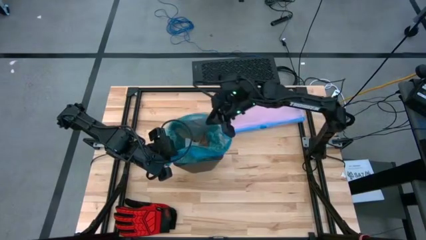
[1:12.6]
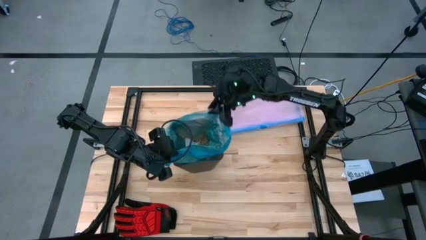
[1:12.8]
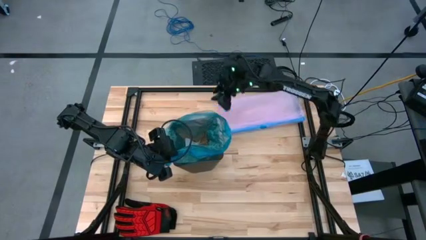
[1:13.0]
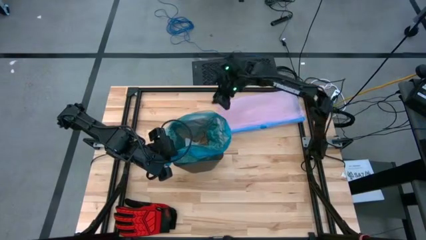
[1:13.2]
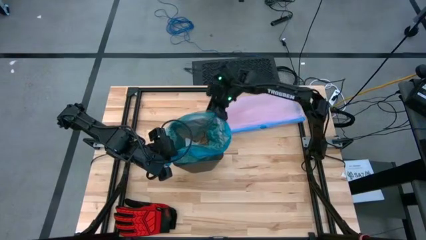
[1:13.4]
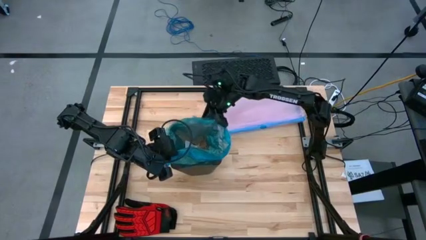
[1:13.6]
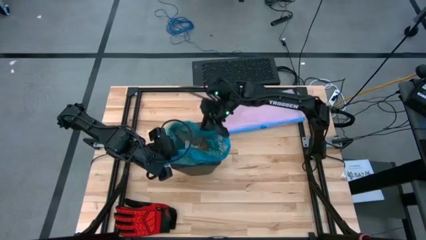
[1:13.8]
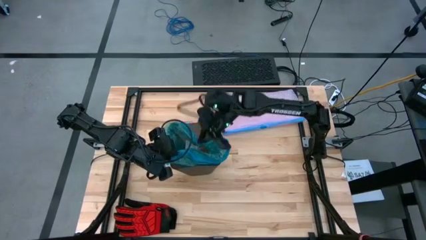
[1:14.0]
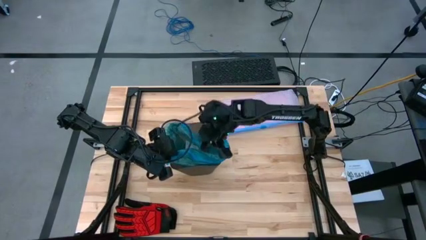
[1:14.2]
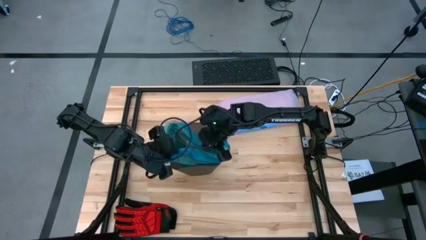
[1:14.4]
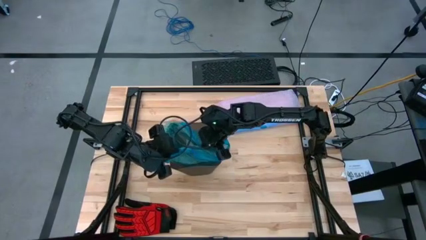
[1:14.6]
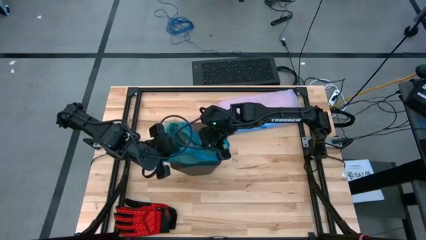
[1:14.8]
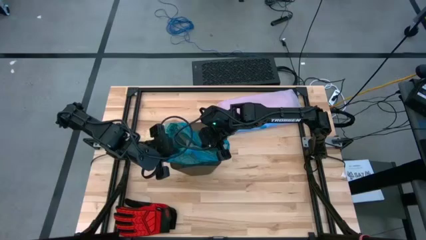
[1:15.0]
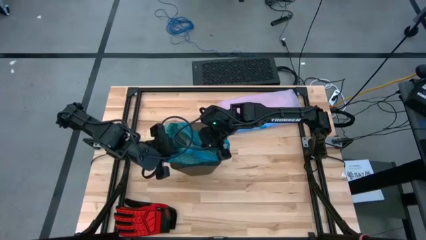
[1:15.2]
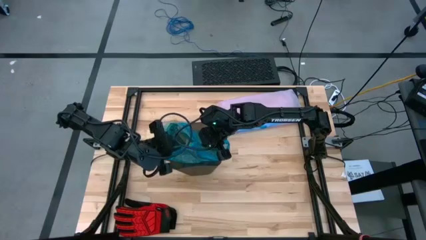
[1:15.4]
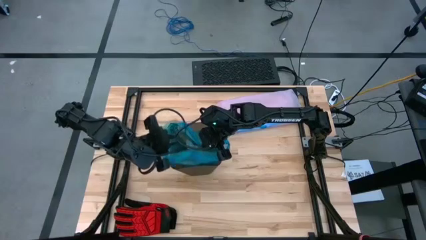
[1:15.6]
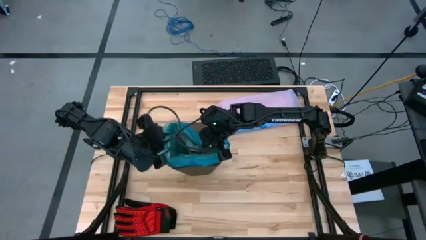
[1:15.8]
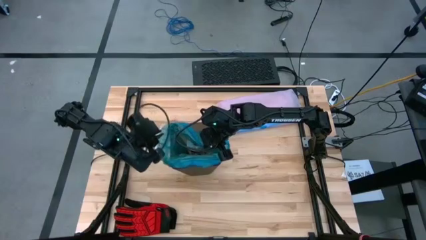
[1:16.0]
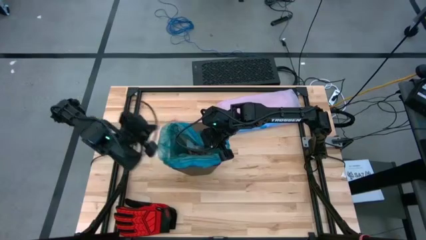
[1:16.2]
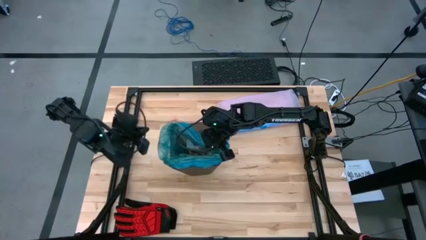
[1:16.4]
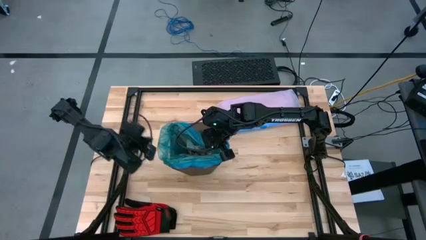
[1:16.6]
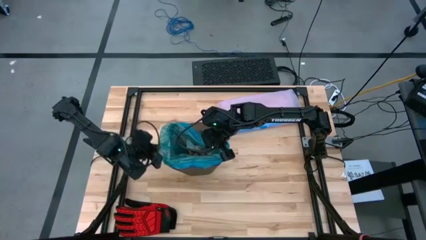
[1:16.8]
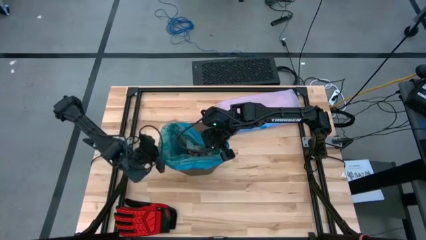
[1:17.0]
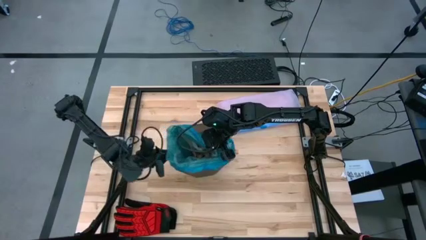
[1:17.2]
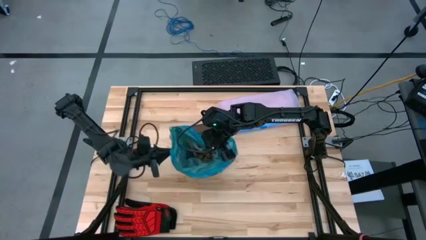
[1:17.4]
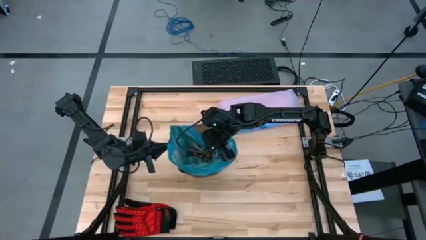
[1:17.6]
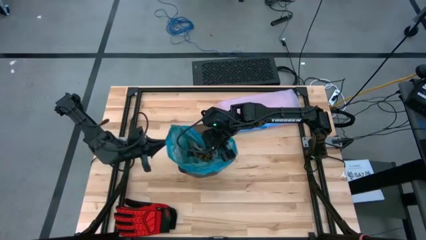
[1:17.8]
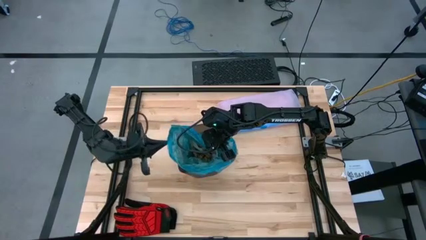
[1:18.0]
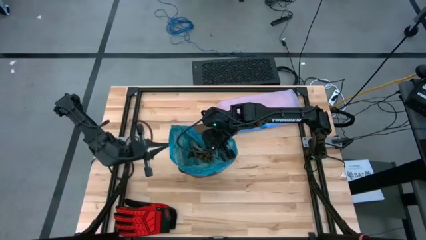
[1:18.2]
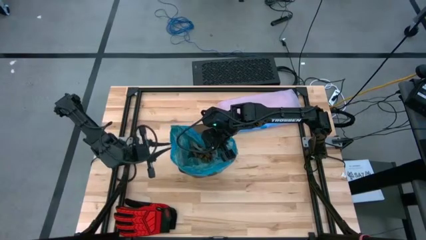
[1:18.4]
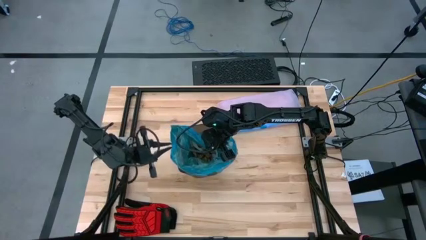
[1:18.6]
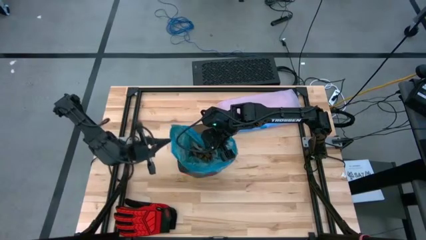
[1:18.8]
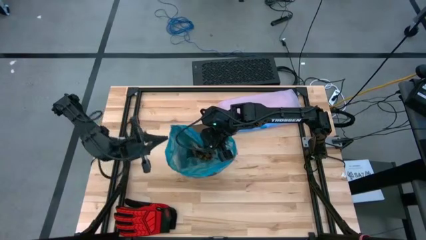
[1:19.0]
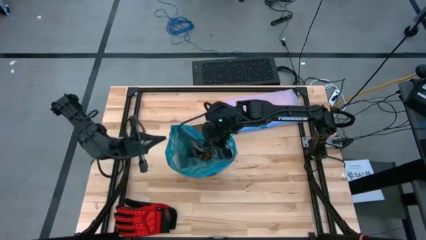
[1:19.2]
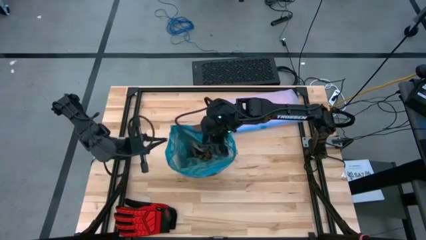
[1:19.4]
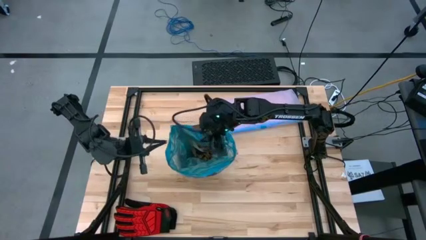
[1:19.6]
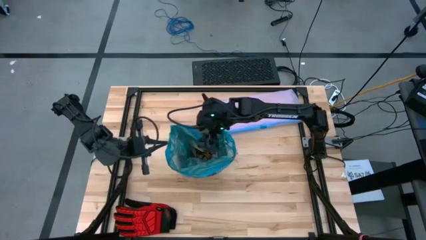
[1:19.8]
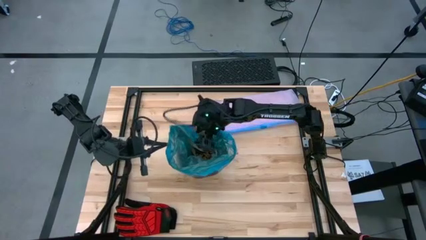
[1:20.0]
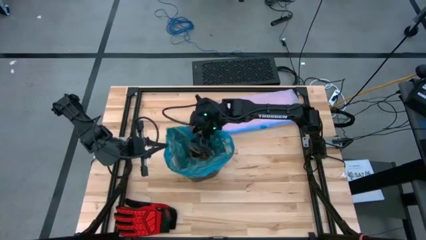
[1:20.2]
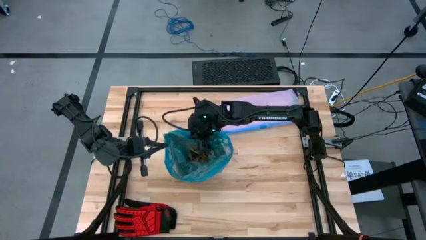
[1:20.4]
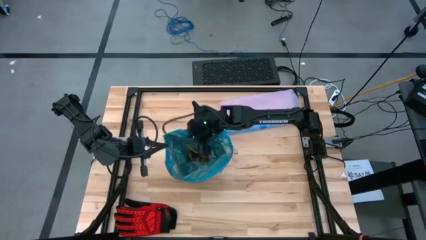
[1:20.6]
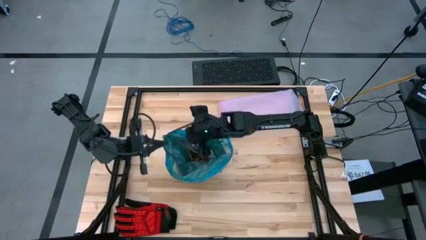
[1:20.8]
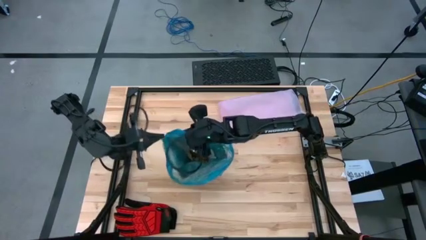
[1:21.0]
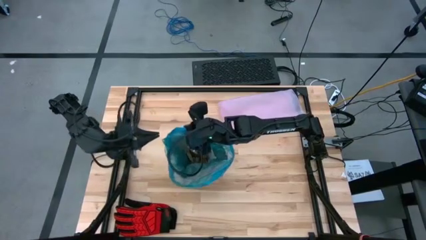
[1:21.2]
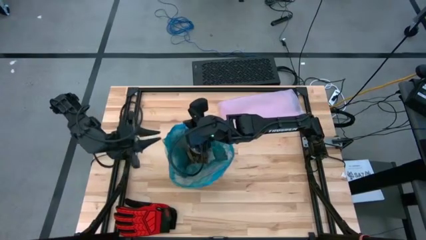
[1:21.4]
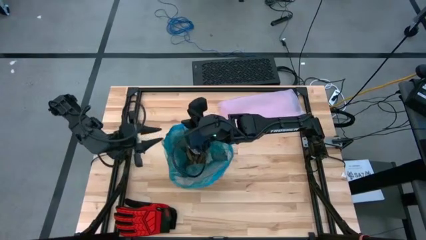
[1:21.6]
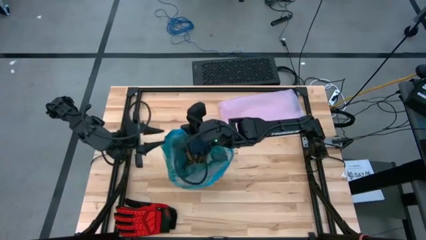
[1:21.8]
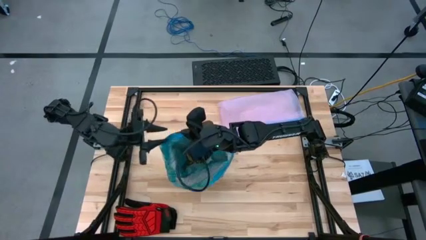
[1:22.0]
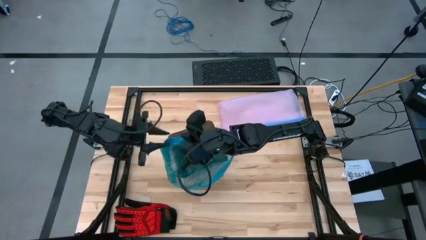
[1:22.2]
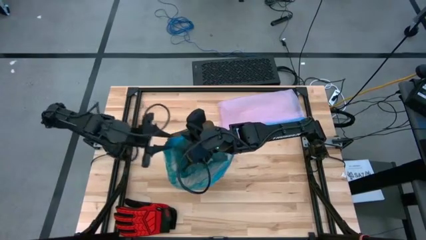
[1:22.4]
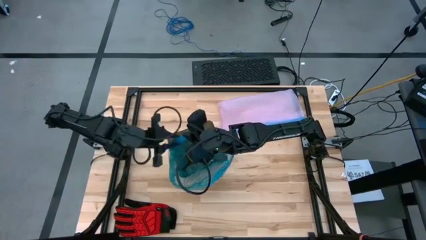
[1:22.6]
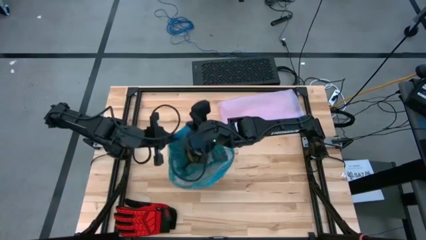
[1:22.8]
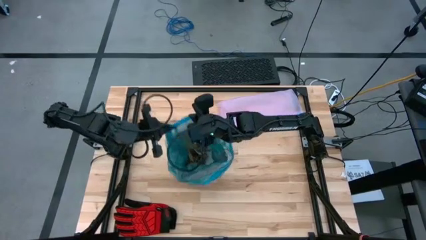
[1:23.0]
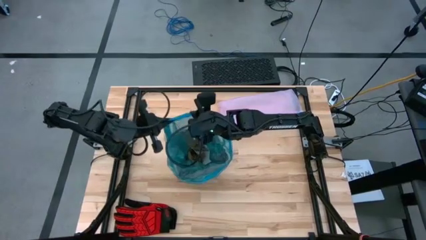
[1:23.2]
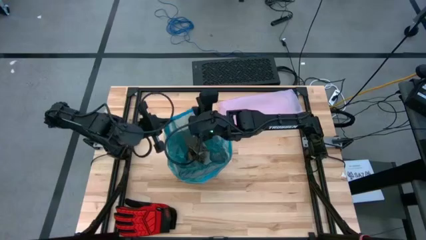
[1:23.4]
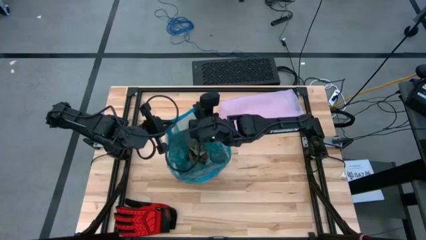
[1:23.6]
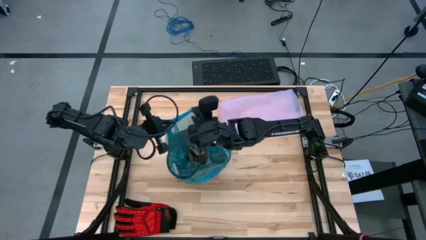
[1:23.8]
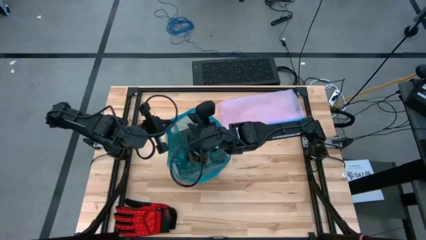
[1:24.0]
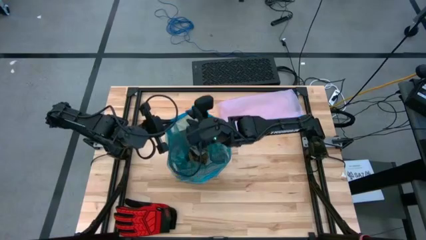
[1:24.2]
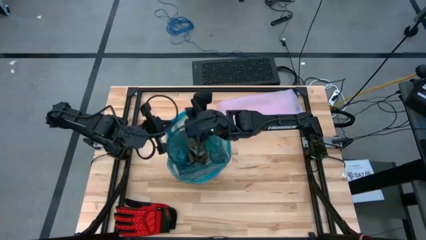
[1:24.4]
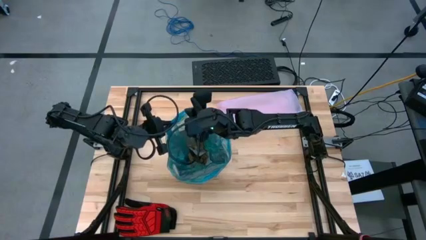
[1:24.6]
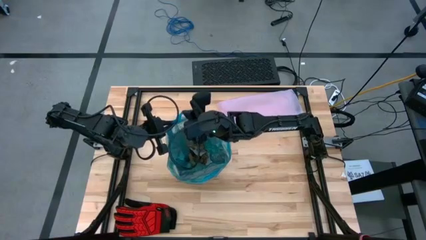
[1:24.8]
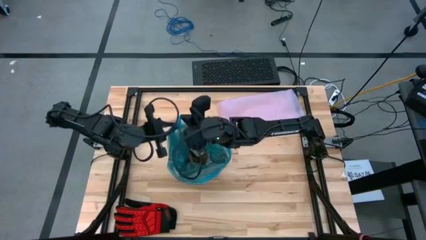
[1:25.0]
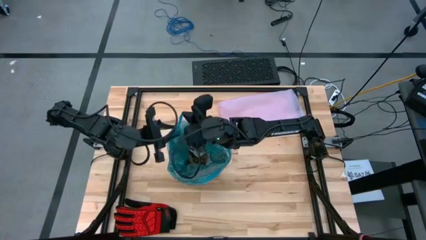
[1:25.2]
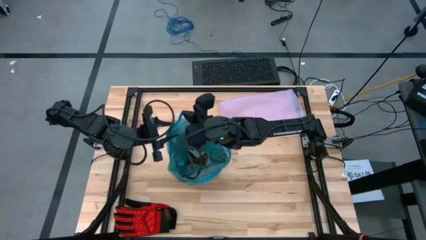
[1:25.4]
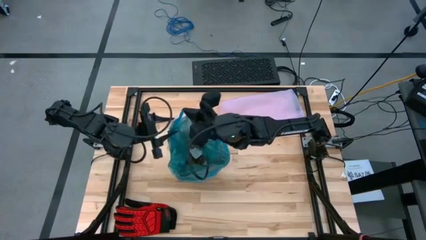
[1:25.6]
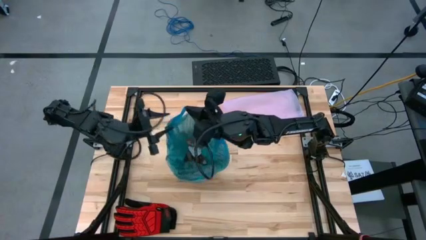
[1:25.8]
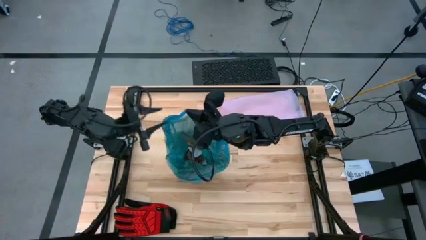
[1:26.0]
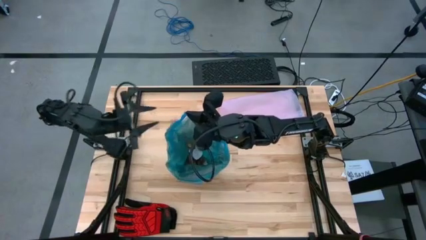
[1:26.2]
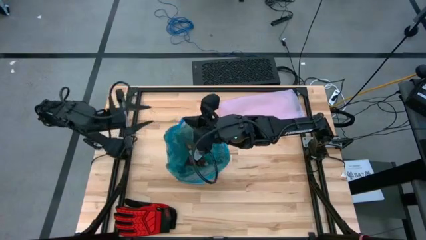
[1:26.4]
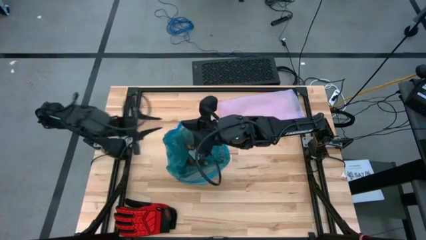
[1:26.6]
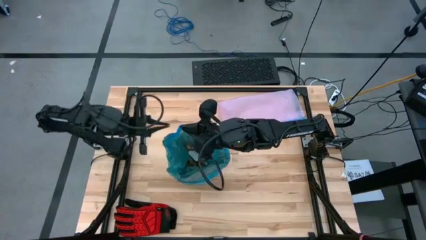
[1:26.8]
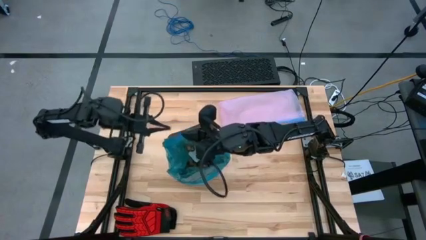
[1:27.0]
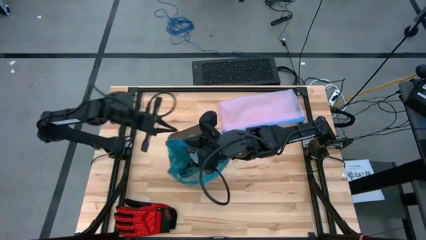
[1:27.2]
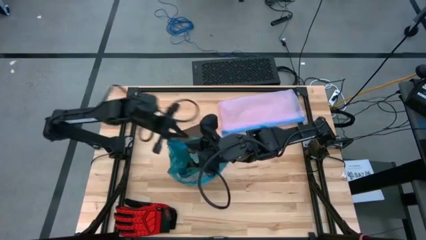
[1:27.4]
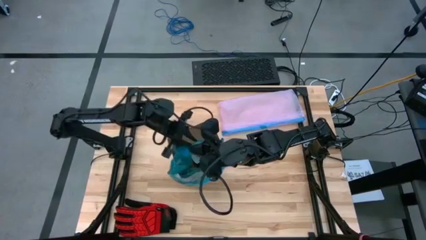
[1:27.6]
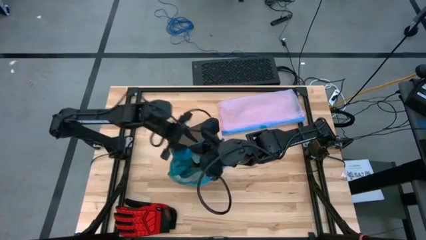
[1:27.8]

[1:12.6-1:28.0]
Task: place trash/remove bag and relplace
Close the trash bag

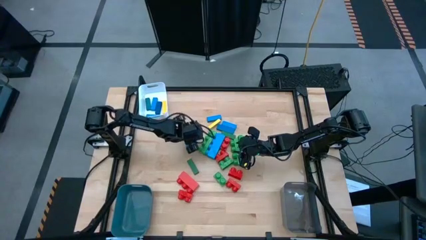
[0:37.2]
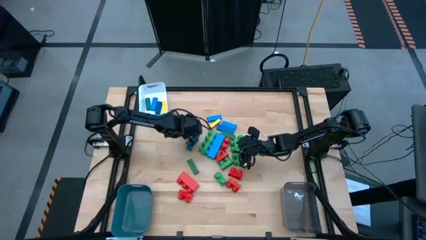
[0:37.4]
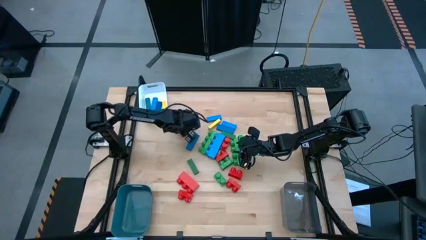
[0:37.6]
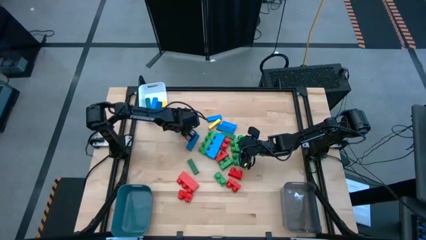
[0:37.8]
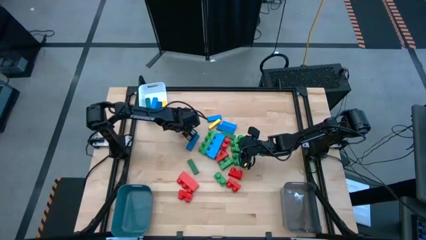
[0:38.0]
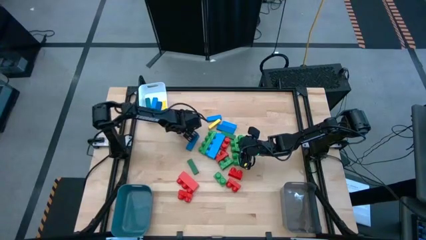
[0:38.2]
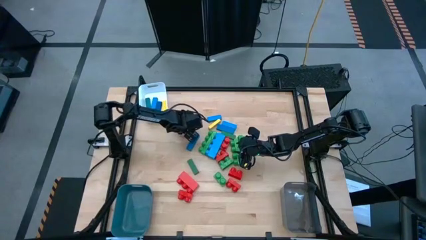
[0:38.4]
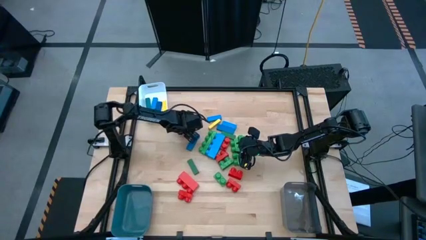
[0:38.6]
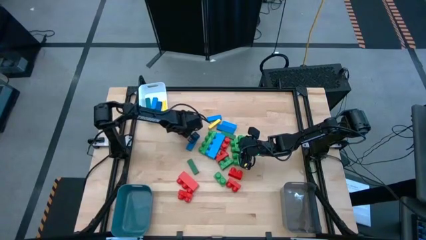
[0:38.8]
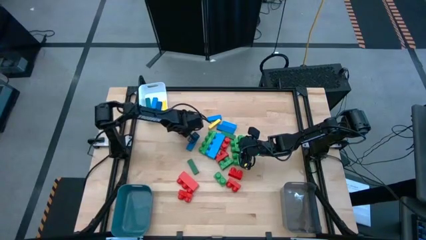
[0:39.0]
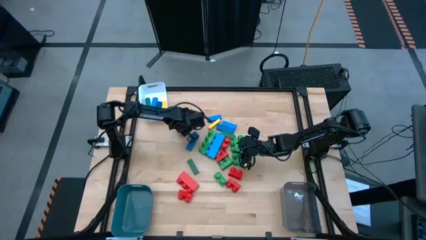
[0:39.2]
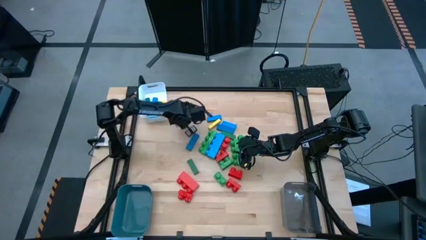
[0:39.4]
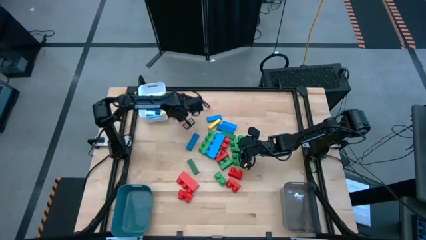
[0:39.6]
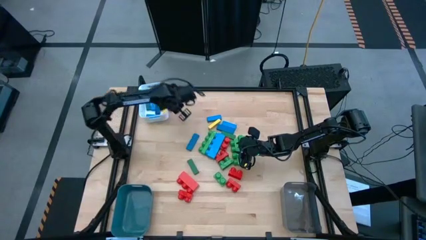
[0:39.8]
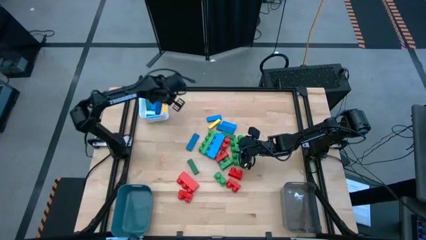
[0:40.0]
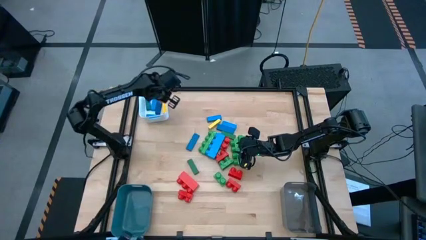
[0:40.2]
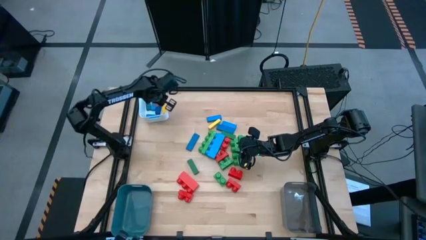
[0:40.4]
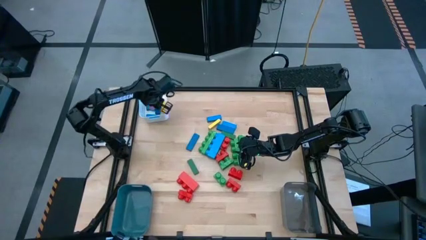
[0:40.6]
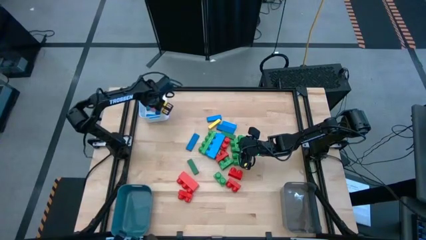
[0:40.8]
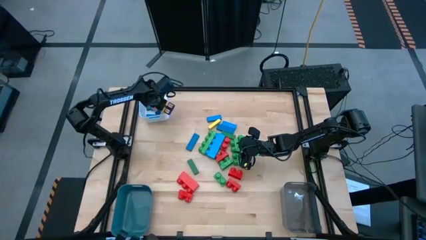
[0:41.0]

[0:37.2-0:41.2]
Task: Sort blocks by size
Put the pink block into the white bin
